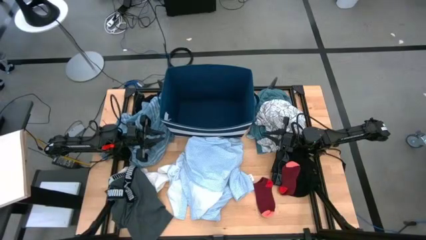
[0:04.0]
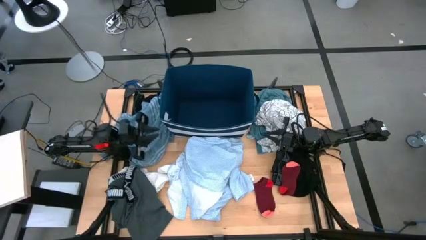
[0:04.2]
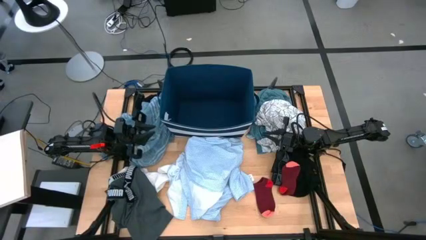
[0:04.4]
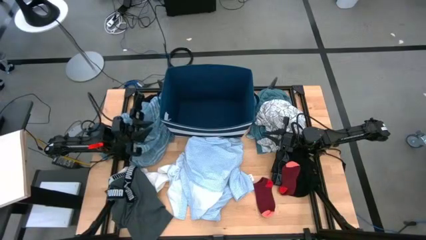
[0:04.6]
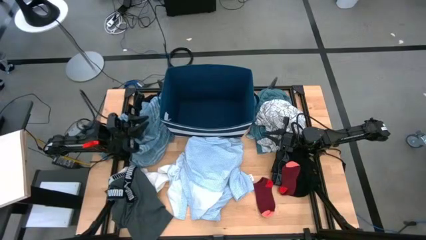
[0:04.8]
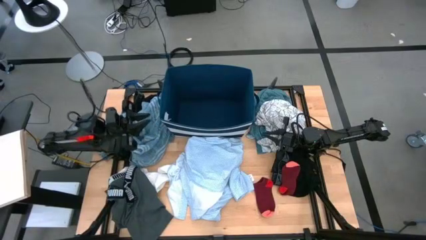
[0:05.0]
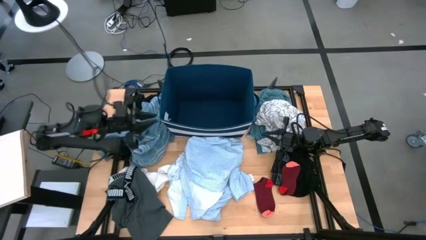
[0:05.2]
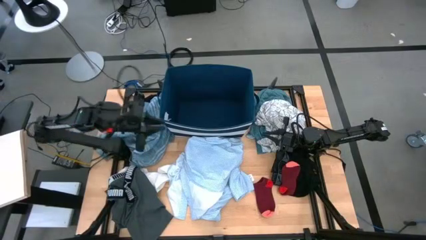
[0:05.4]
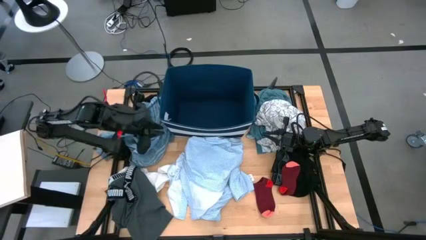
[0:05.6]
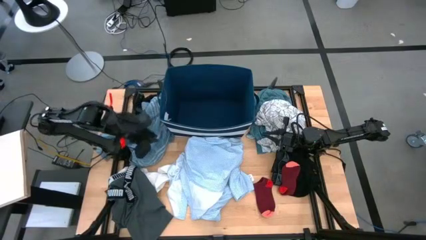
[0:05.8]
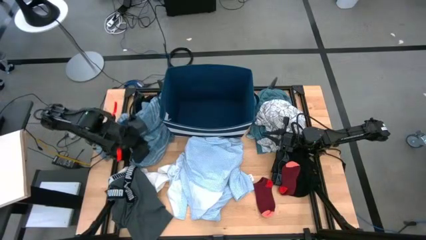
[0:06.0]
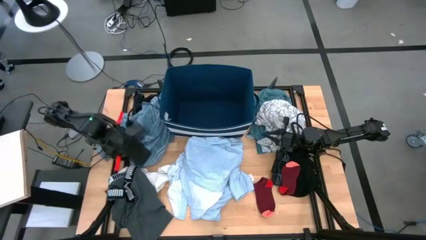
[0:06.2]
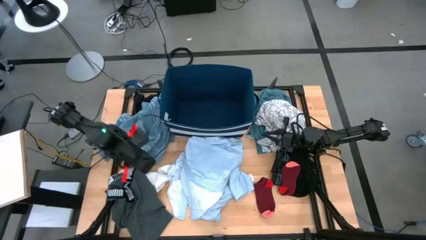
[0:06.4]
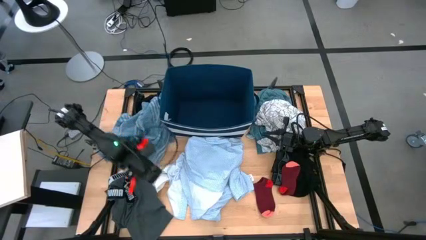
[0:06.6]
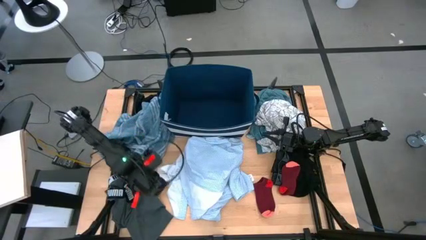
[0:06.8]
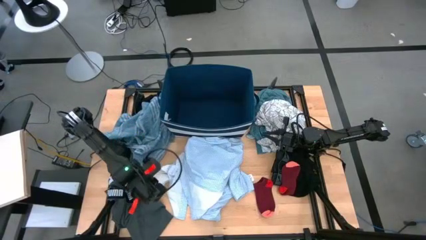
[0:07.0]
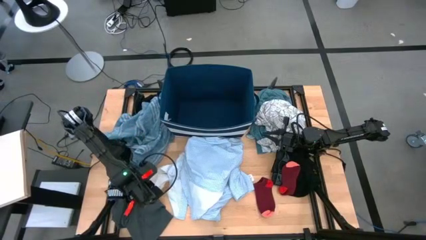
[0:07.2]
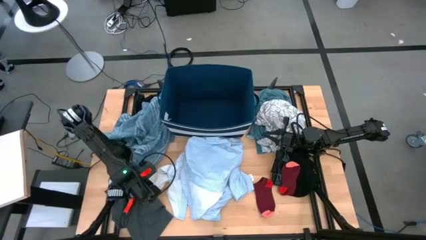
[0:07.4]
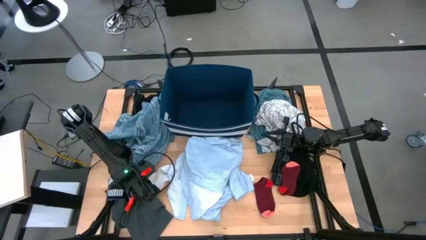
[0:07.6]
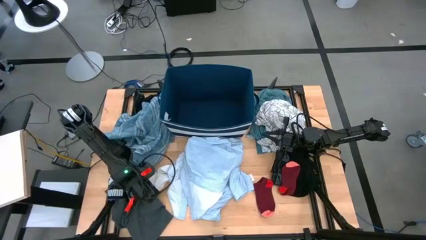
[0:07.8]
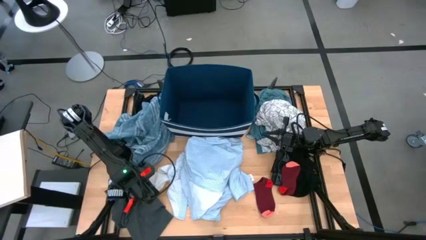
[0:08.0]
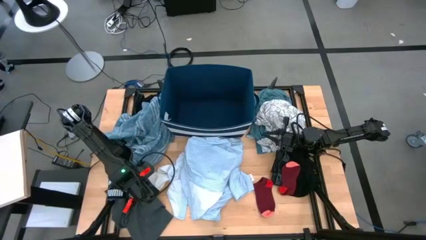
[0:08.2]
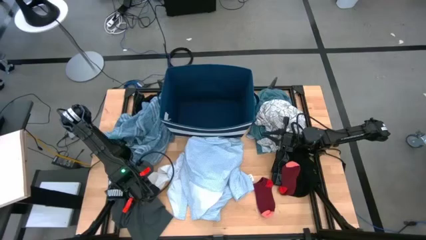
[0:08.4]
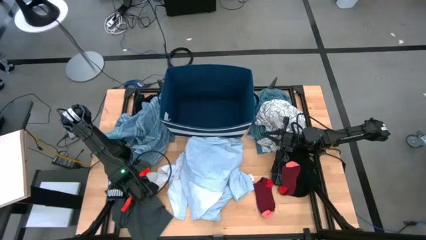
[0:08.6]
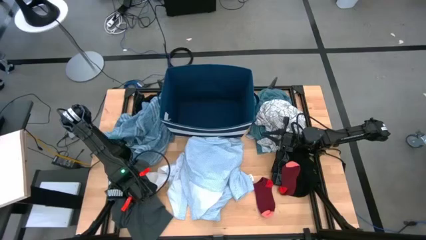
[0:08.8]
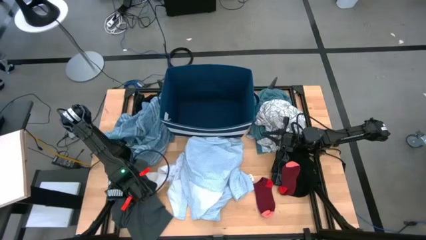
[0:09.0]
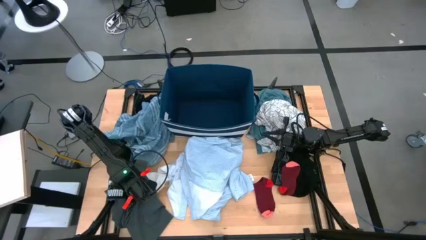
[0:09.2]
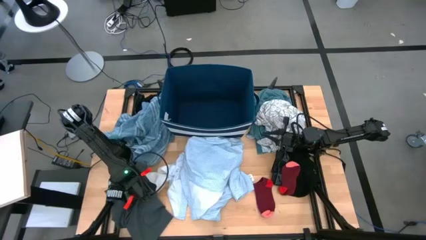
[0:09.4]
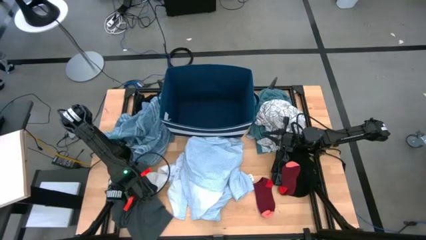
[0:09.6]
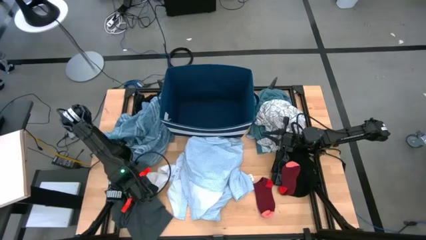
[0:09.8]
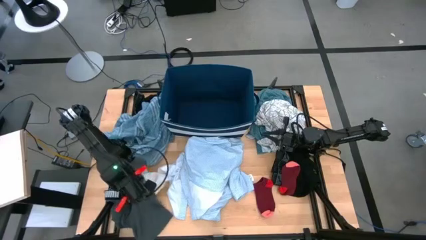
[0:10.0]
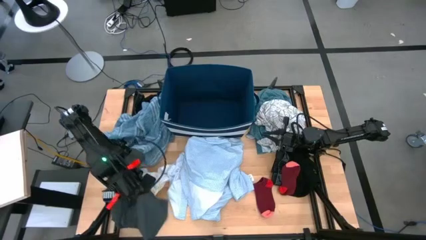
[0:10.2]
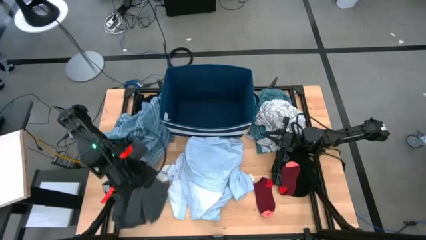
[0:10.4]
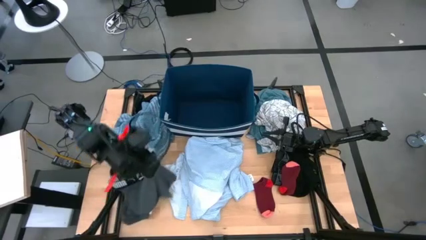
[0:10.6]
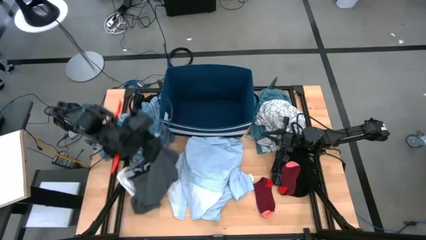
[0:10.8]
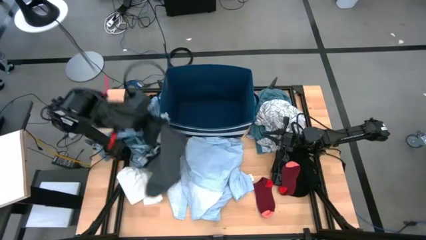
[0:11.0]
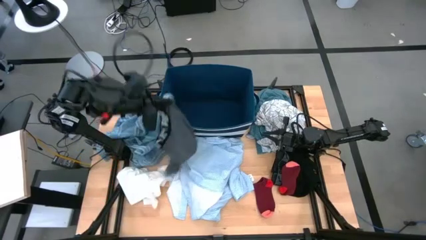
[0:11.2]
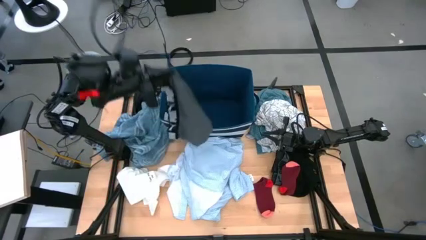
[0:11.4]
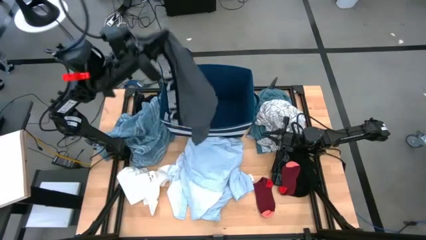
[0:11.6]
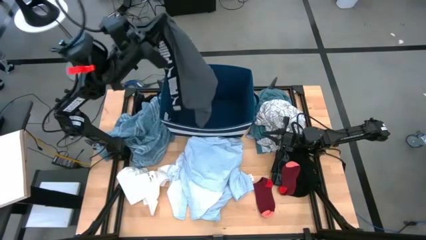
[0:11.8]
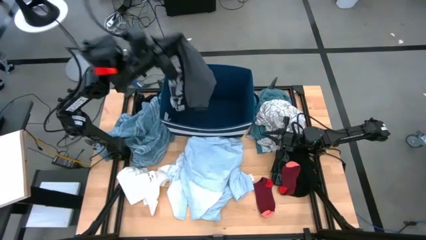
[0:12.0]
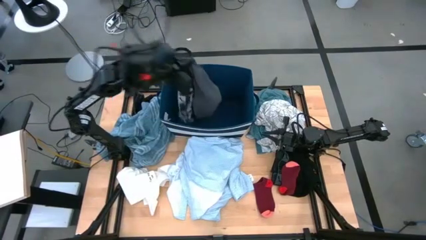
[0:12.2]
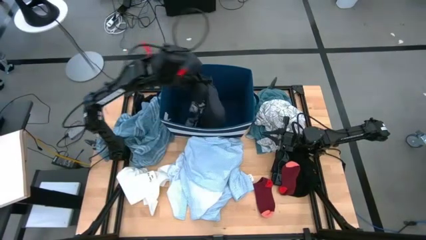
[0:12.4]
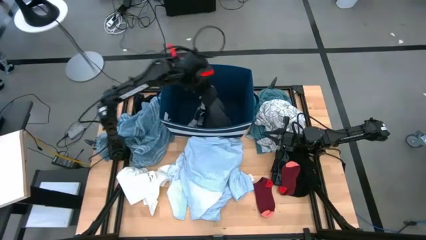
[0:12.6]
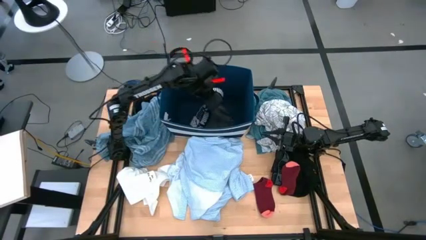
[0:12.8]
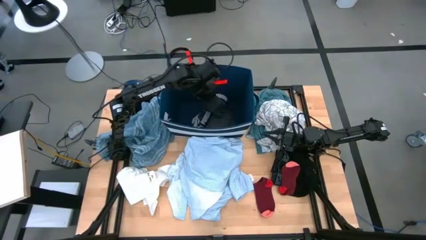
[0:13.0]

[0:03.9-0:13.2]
Task: Sort clothes
Put the gray underwear into the bin

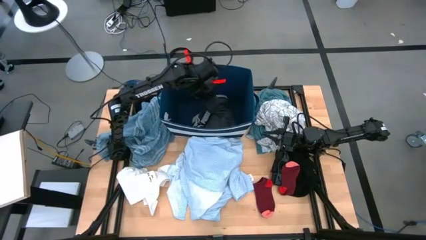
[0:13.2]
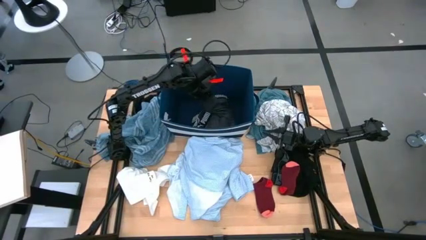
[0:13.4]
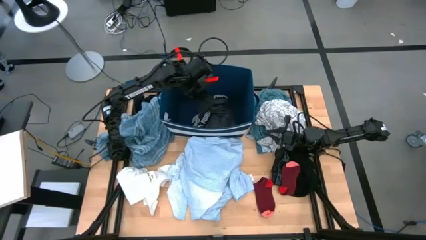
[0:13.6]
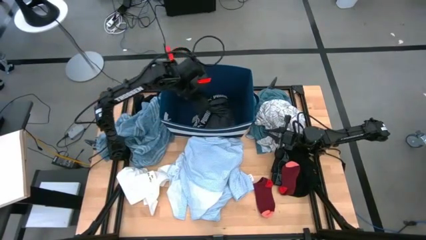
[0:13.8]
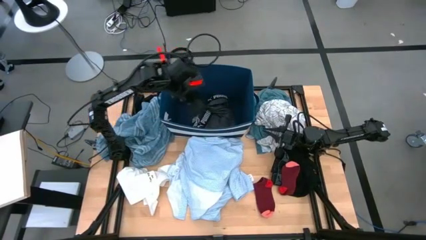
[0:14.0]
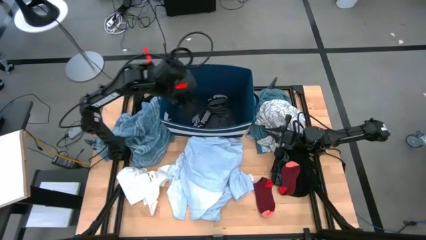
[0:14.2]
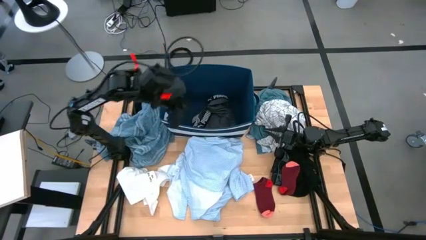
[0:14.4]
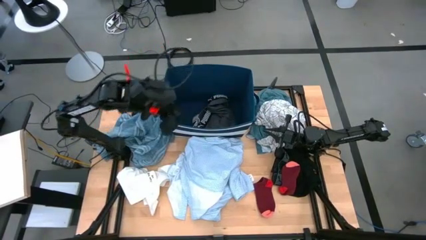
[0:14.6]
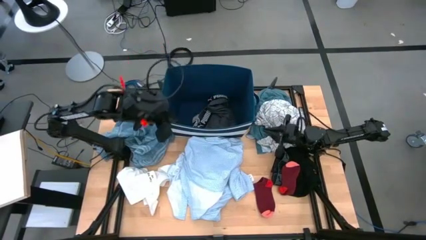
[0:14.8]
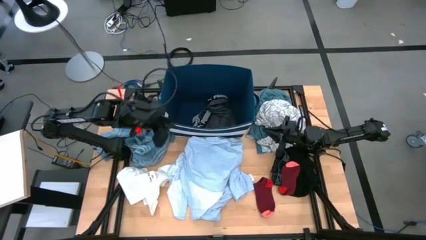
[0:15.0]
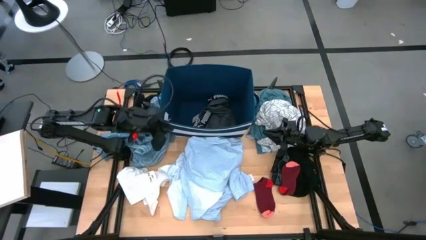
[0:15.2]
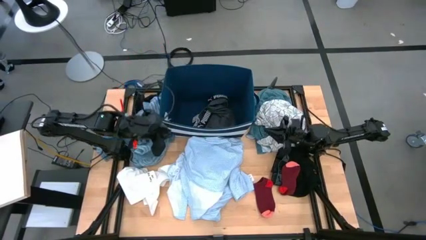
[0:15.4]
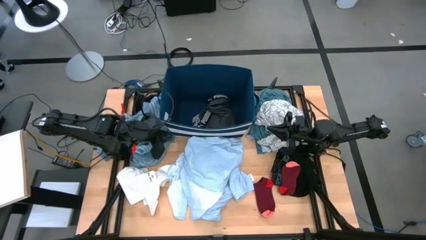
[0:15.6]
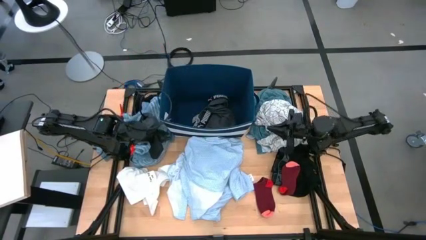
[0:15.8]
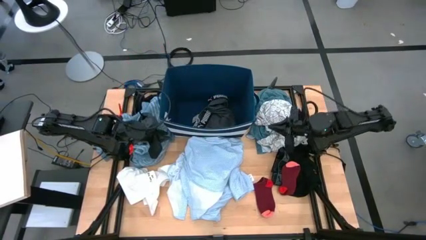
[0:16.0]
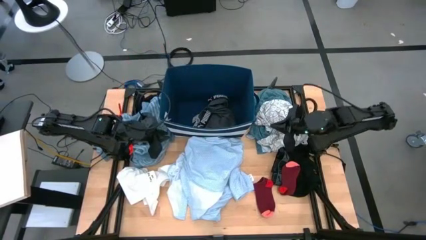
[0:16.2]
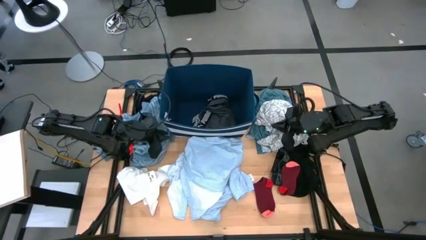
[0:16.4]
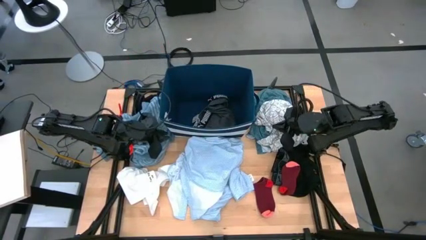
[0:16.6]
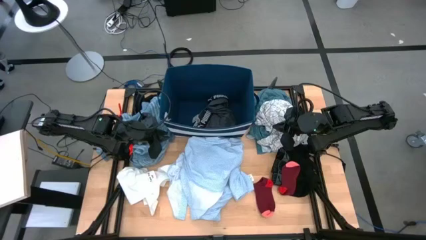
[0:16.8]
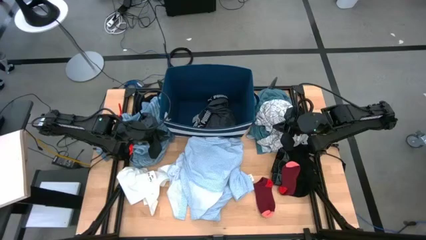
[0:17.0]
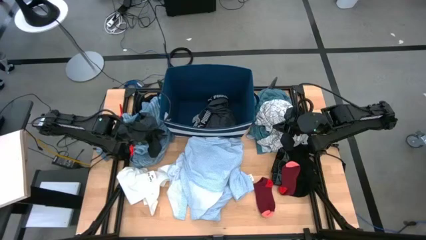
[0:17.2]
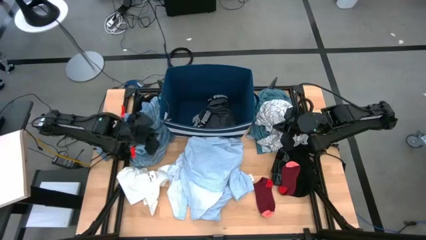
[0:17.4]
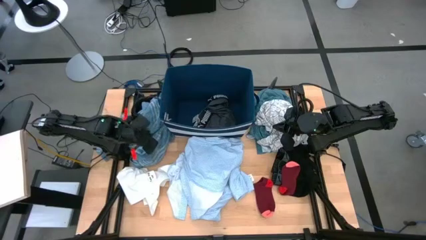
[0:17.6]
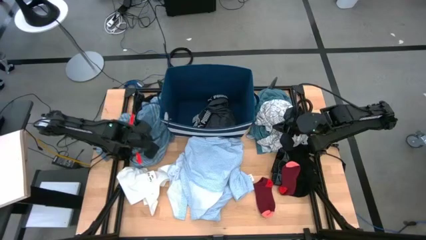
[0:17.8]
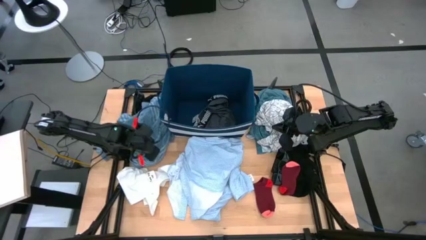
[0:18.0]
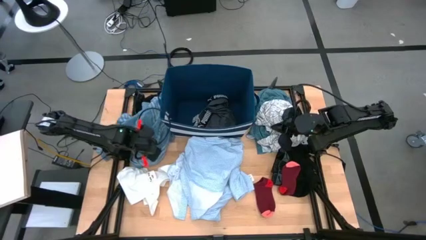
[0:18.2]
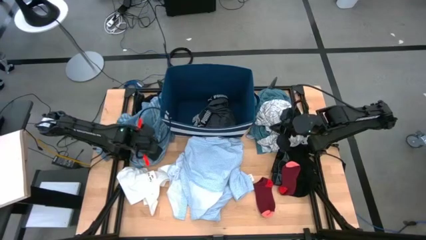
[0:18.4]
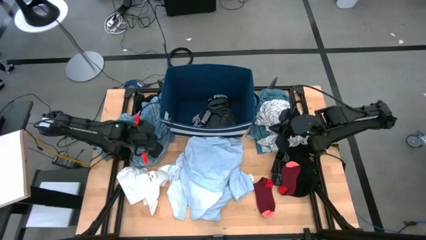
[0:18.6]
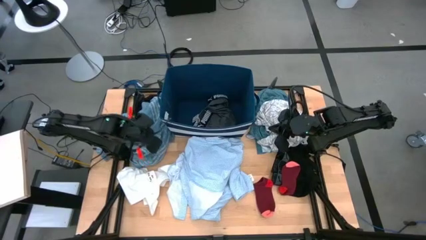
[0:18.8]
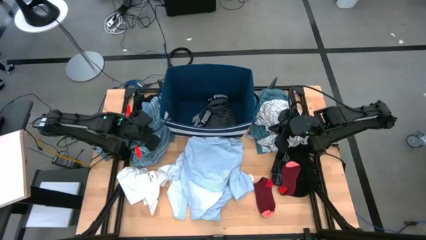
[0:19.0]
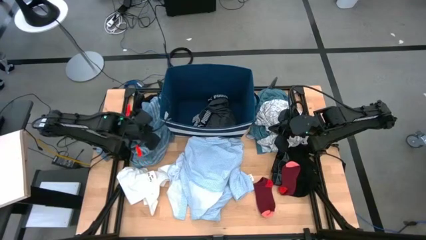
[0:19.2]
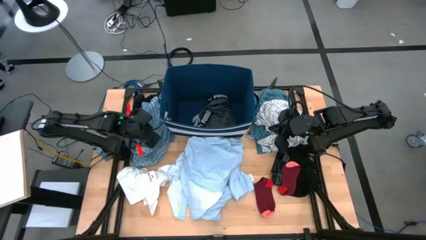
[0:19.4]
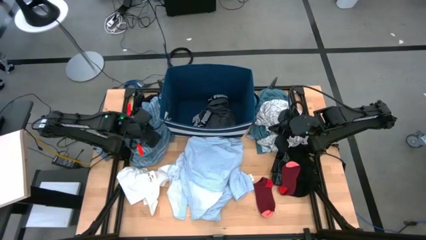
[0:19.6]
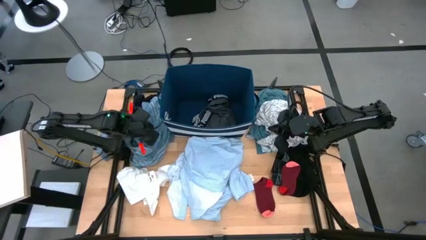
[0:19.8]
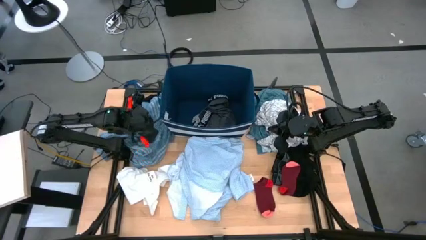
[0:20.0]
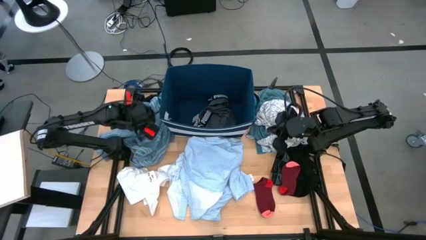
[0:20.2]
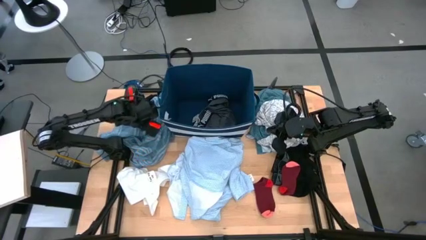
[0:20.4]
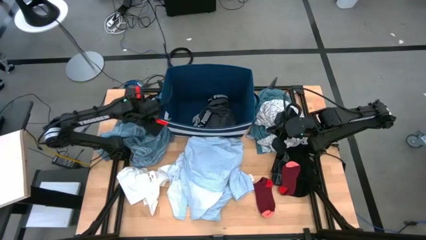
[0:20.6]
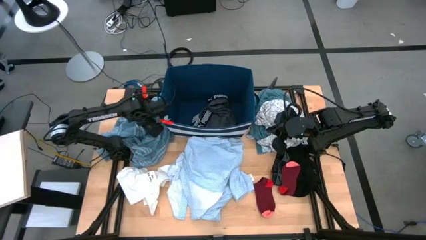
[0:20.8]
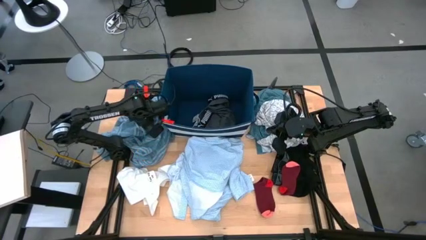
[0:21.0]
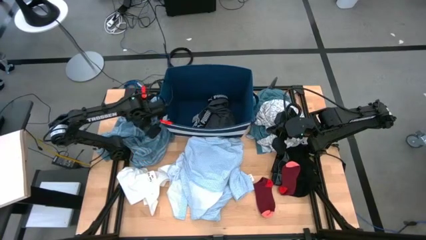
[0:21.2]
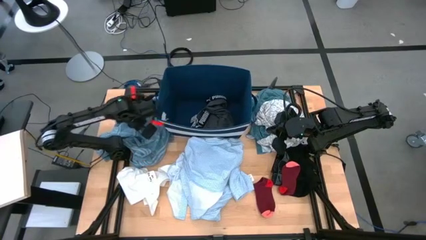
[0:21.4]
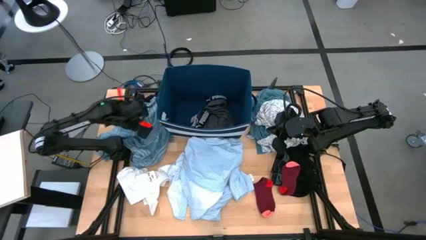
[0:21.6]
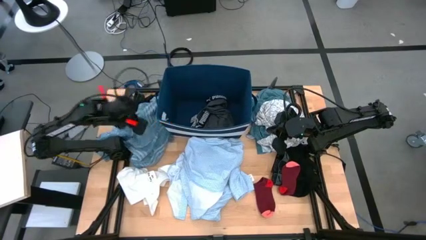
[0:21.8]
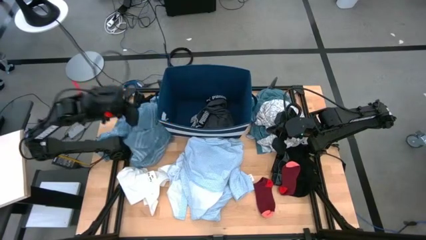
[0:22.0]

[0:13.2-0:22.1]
Put the blue shirt into the bin
